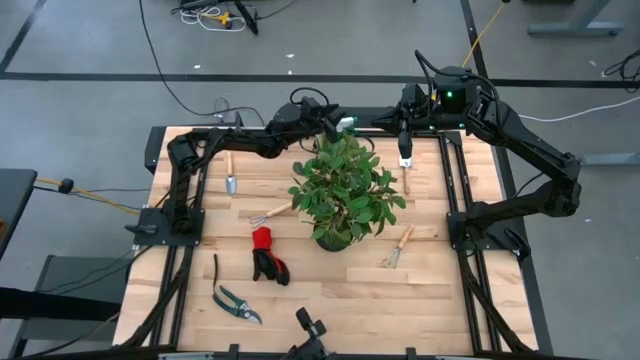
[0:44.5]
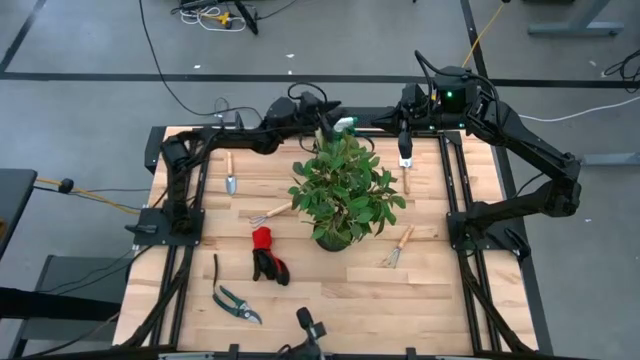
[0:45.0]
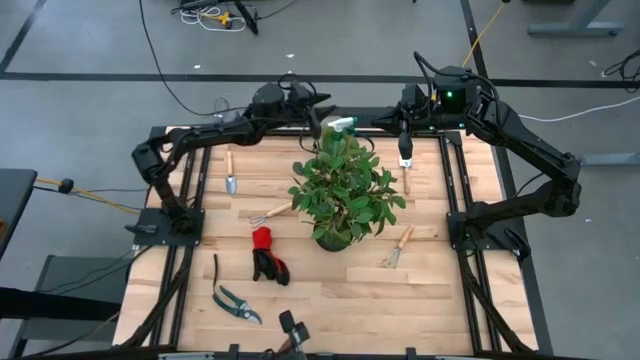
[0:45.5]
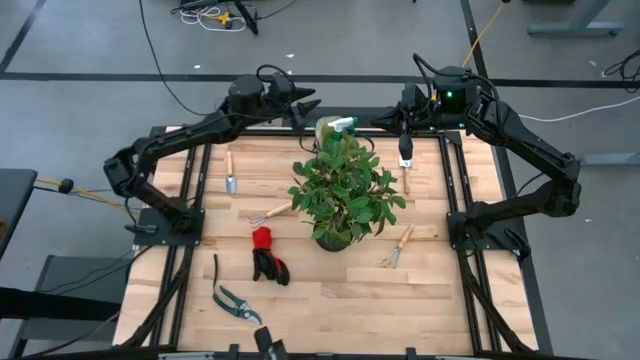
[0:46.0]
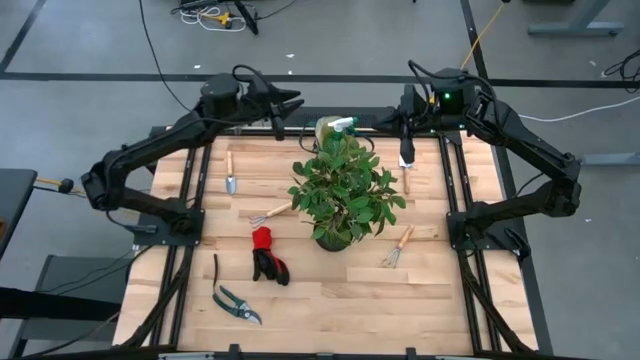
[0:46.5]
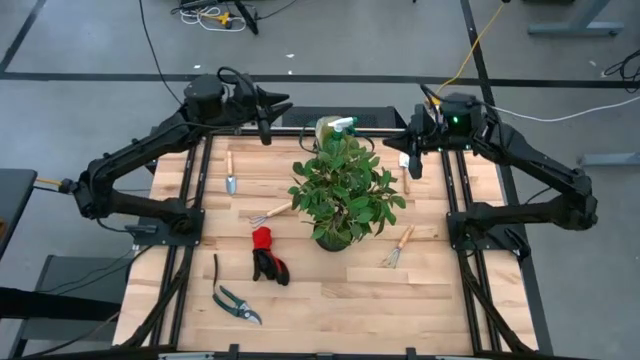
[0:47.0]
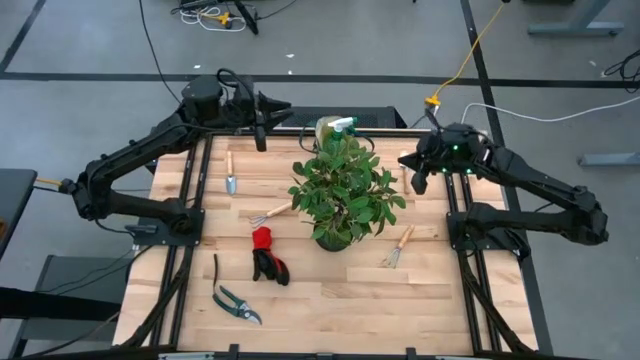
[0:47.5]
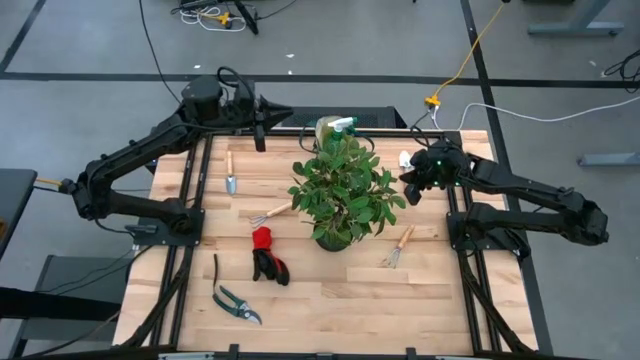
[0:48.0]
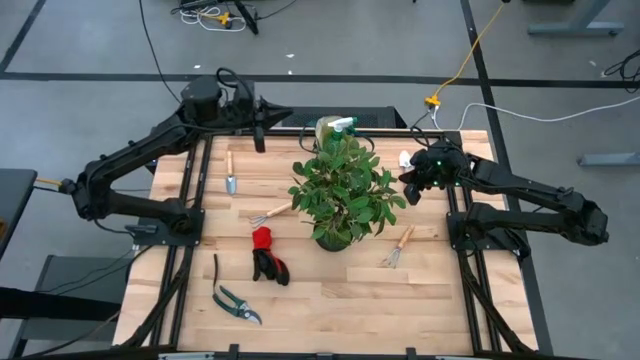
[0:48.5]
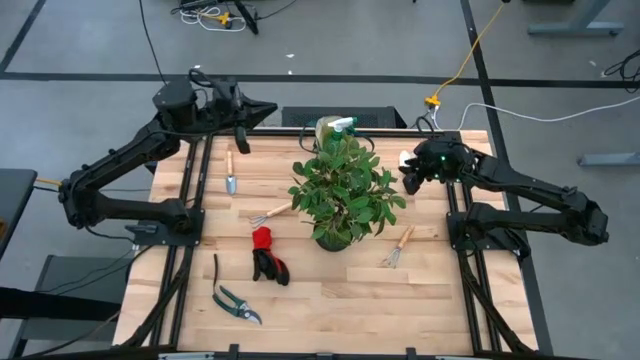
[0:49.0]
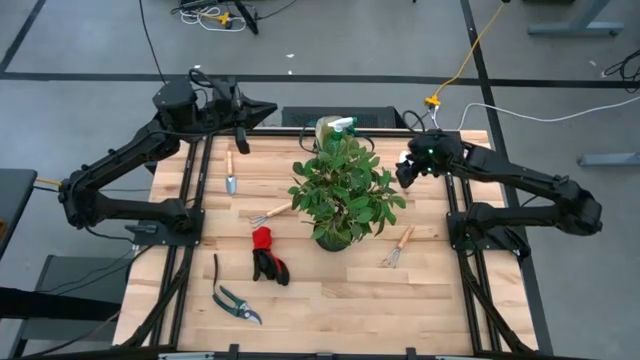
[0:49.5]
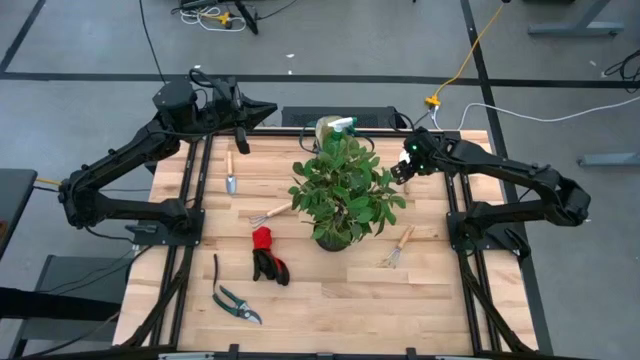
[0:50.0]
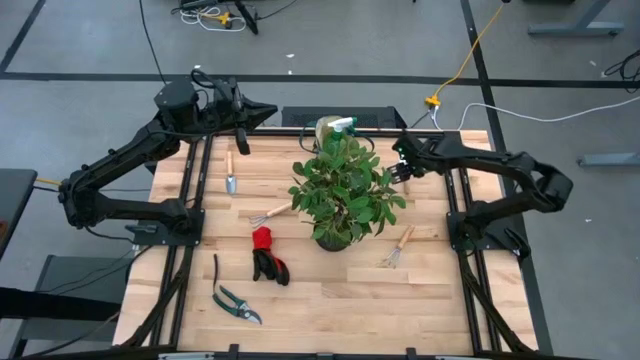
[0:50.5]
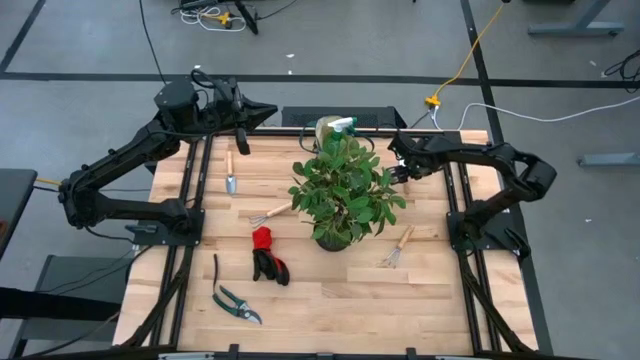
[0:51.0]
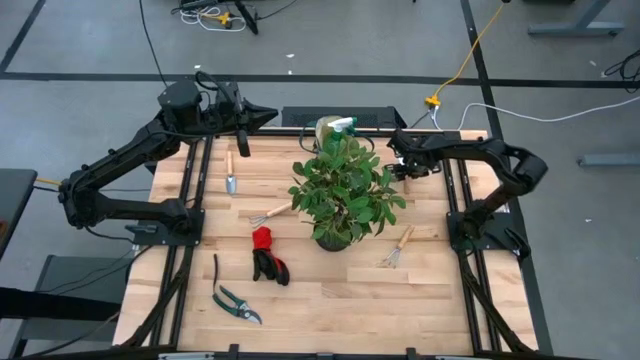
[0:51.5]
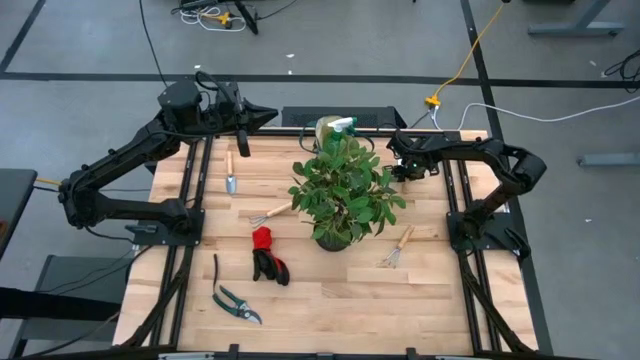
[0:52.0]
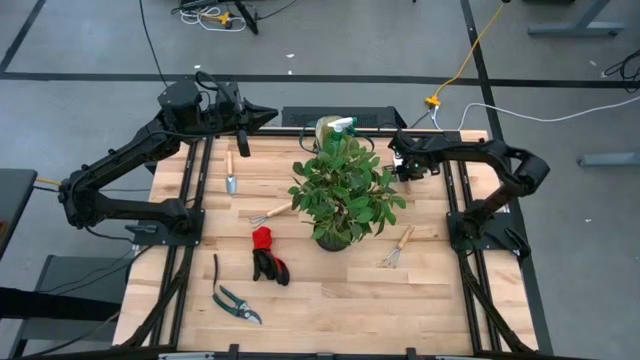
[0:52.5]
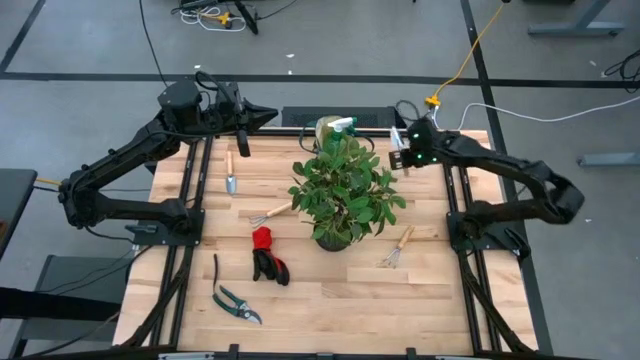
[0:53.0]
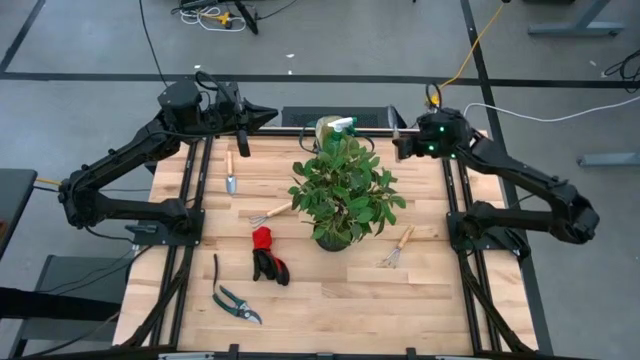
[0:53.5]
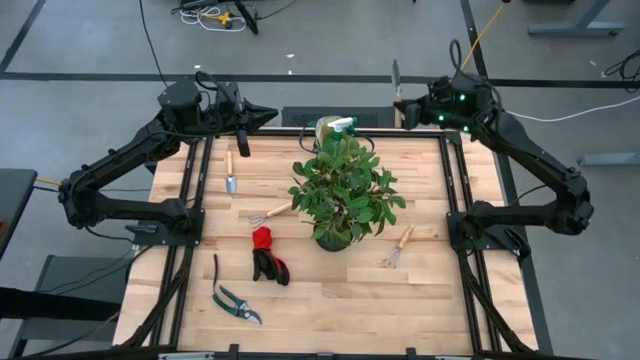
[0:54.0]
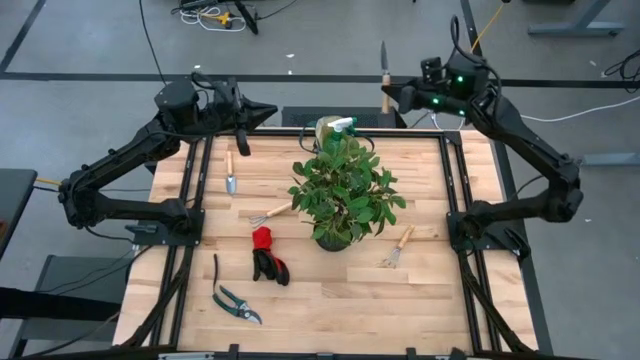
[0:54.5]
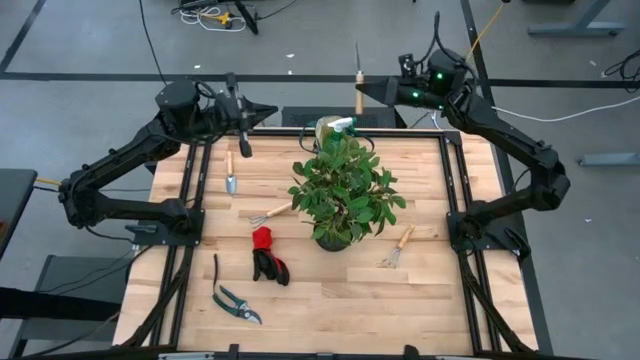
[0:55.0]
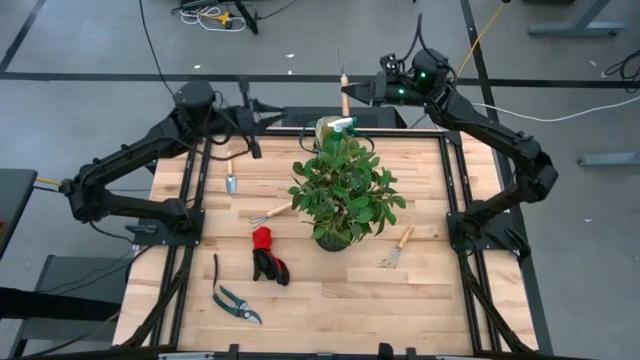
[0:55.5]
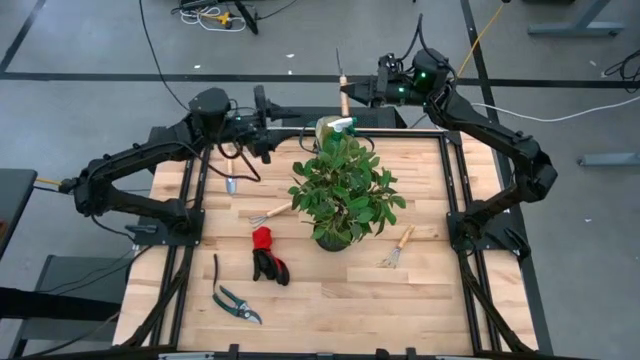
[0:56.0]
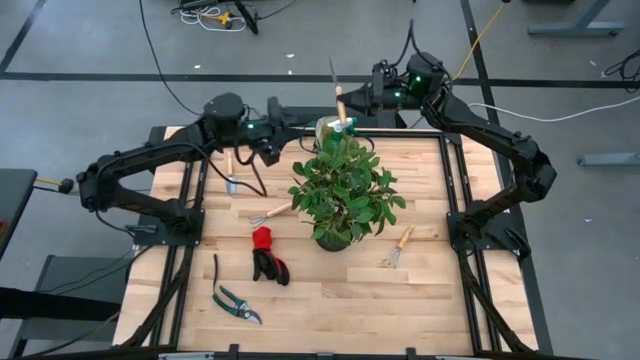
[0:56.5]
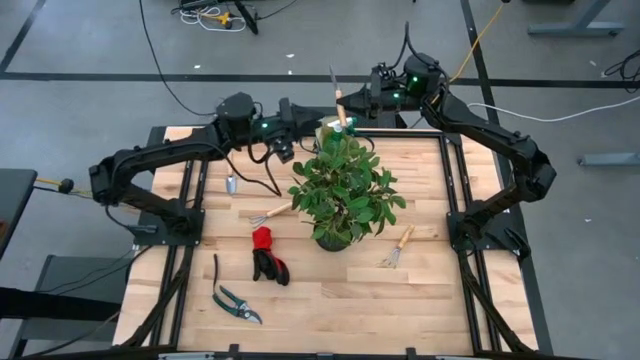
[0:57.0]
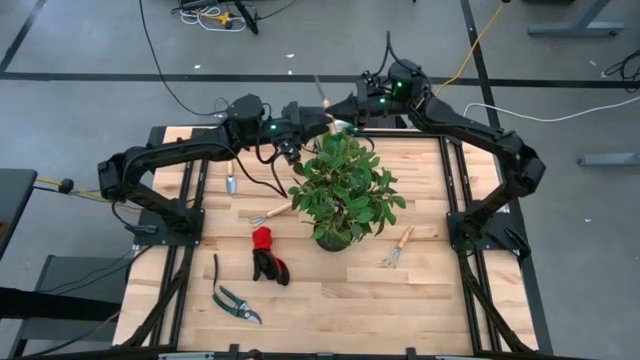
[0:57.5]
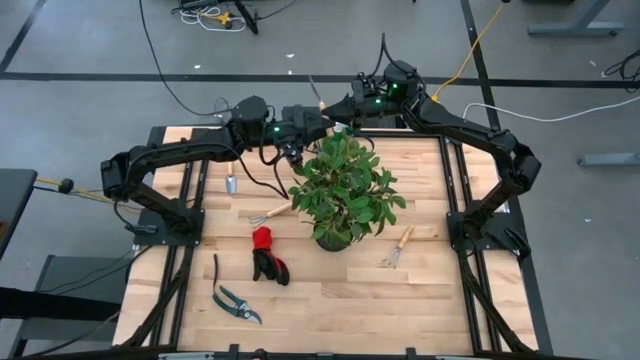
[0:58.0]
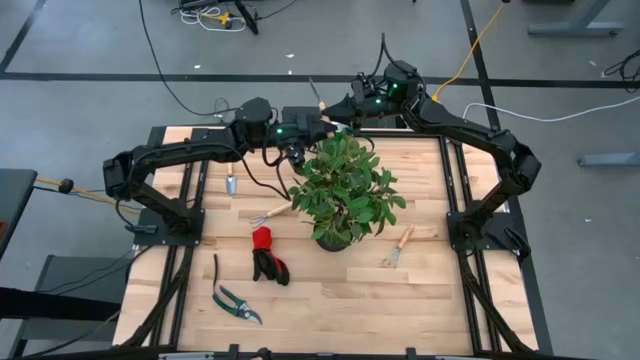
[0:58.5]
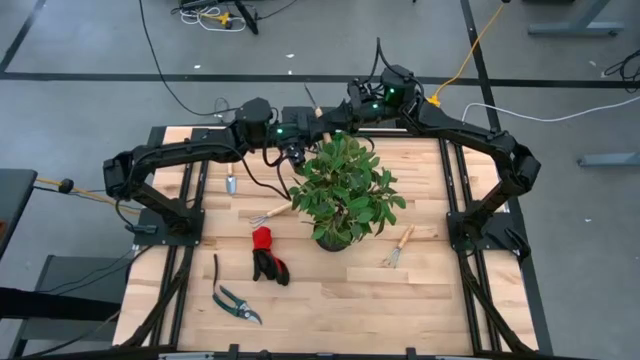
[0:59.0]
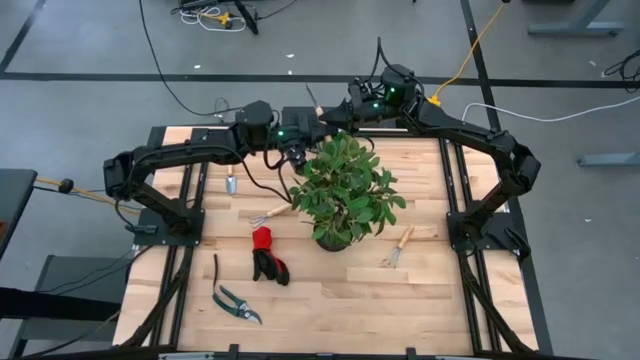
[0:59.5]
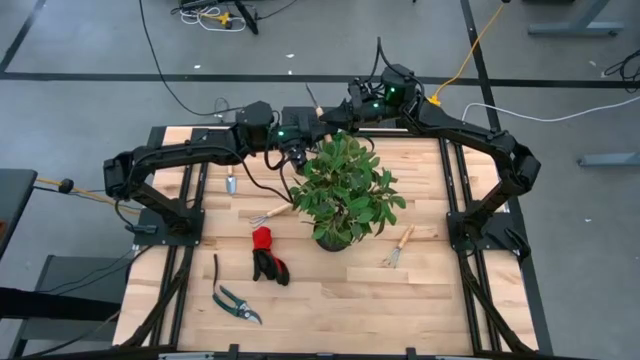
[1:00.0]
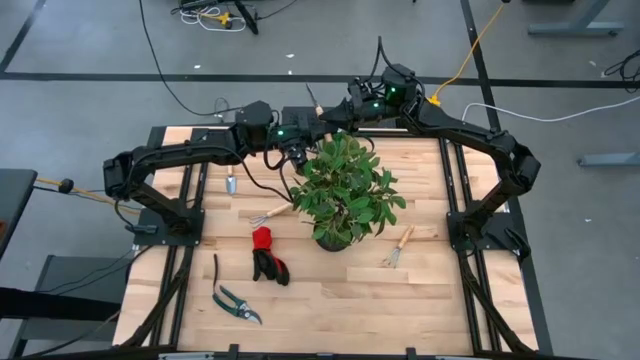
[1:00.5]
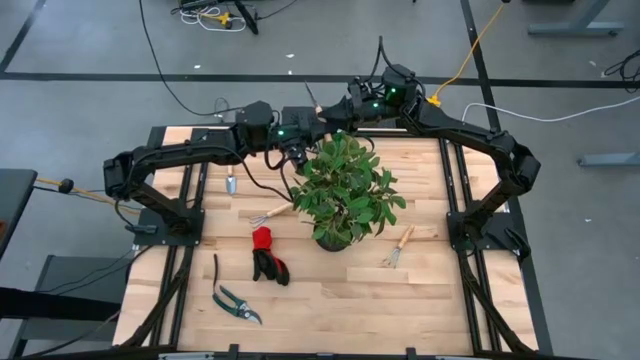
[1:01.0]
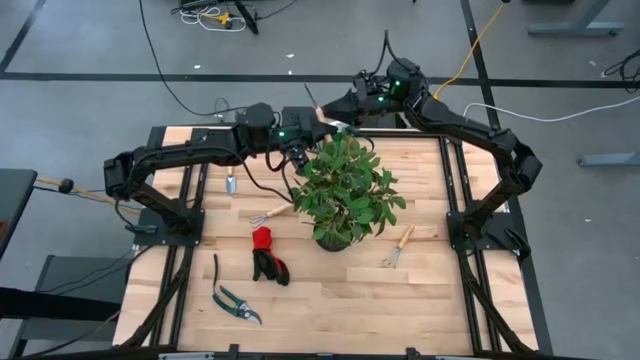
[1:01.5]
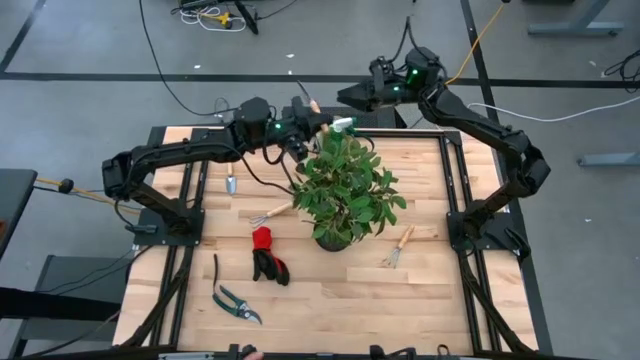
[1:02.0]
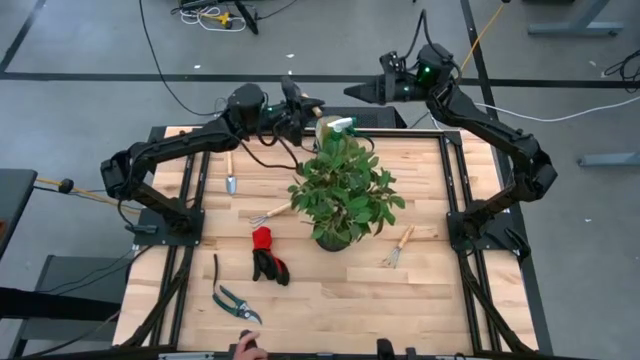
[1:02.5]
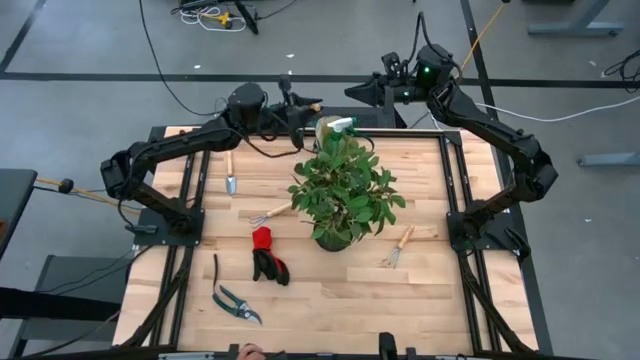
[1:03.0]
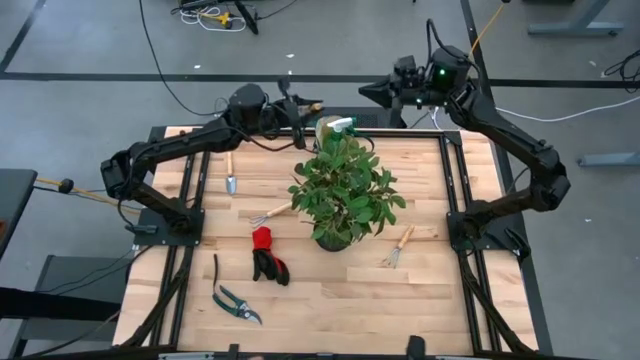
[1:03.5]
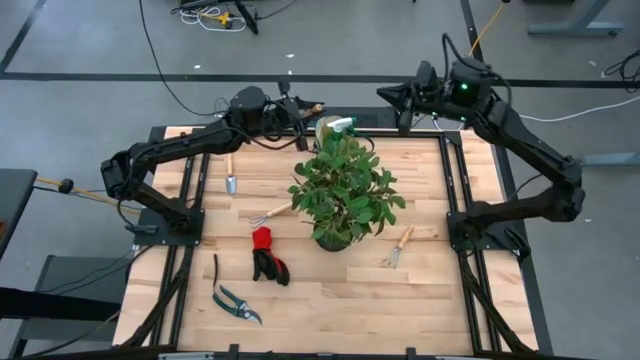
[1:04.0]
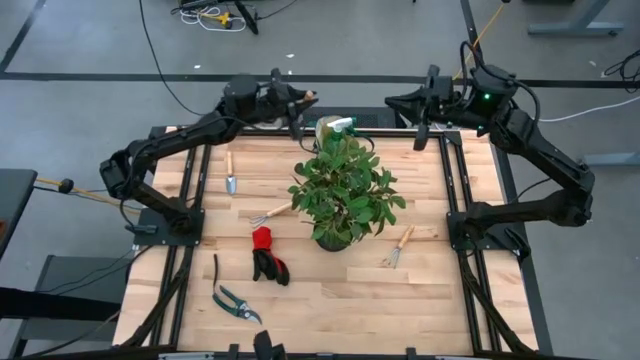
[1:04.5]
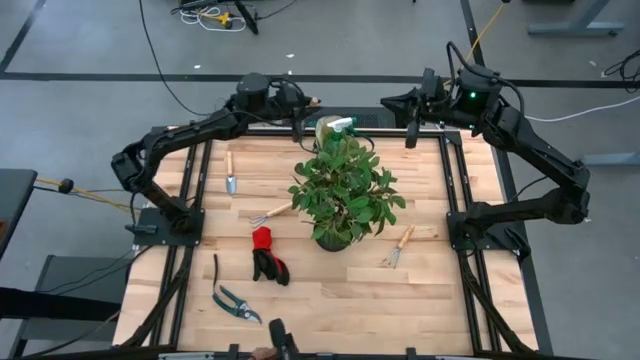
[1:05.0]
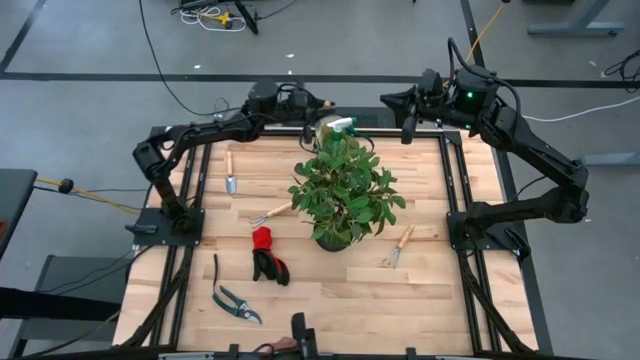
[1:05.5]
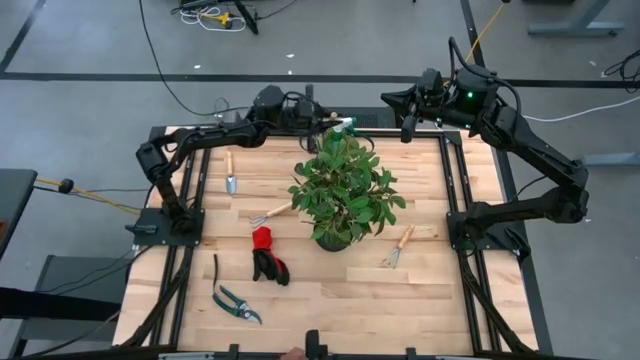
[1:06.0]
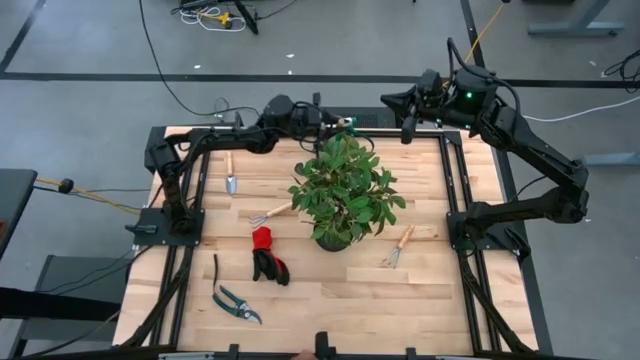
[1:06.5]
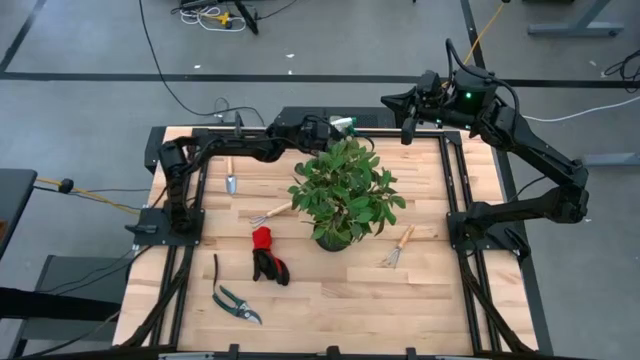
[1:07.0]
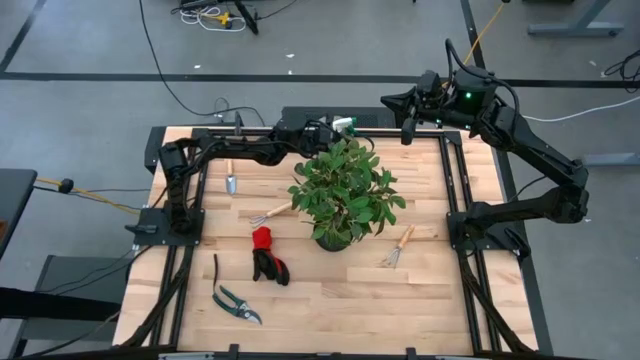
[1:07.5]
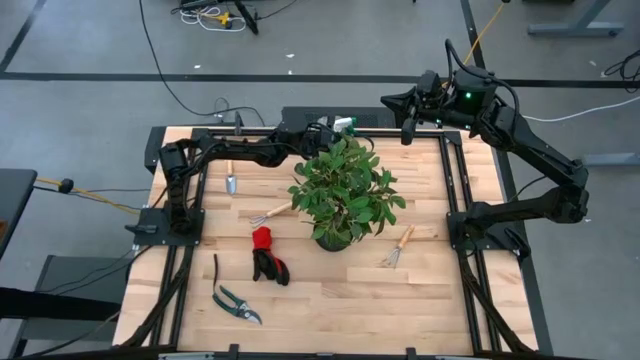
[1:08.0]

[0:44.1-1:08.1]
Task: Pick & Place Garden tools in Gardening bag
Put the brown trowel into the gardening bag
